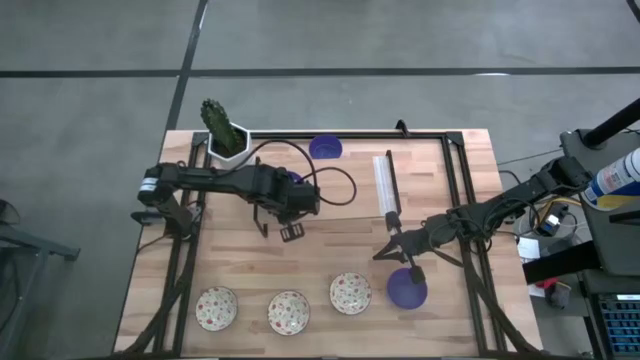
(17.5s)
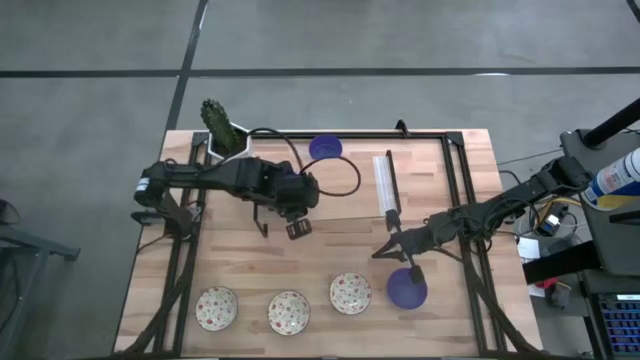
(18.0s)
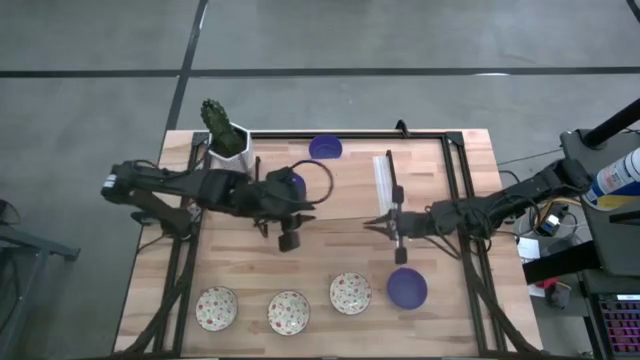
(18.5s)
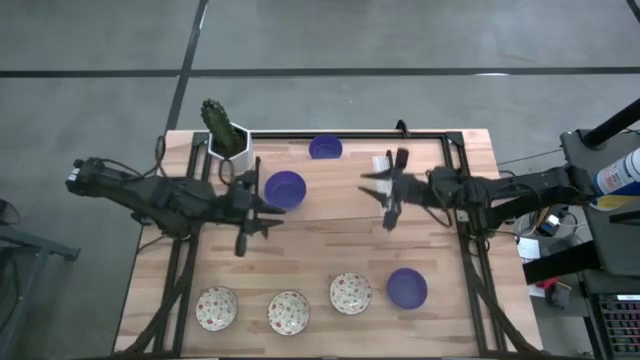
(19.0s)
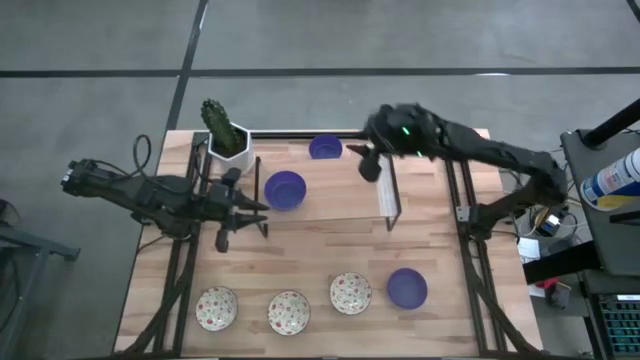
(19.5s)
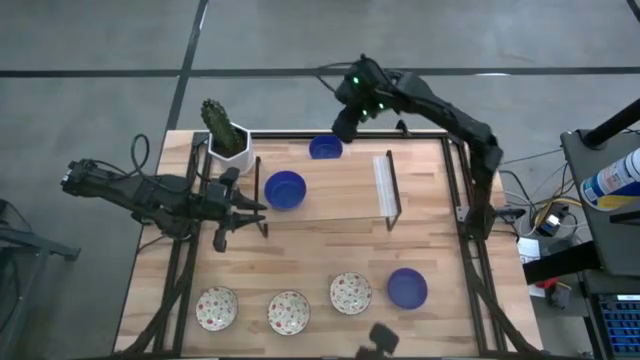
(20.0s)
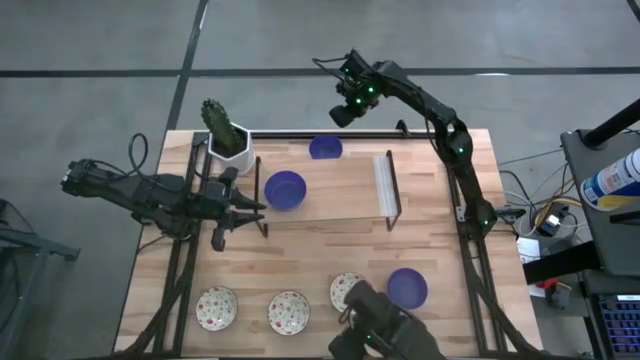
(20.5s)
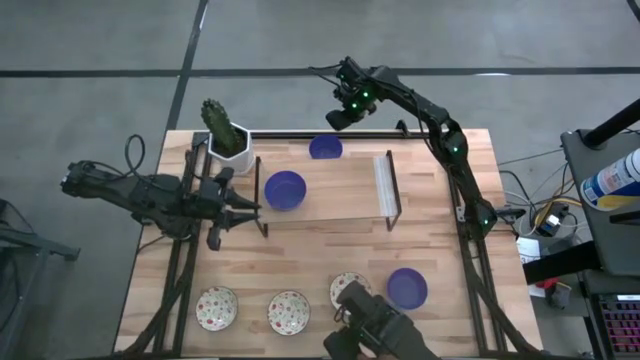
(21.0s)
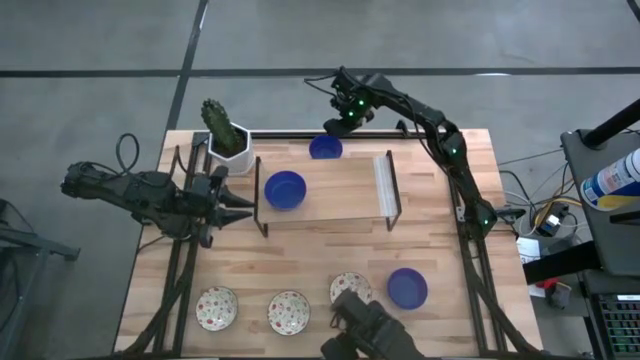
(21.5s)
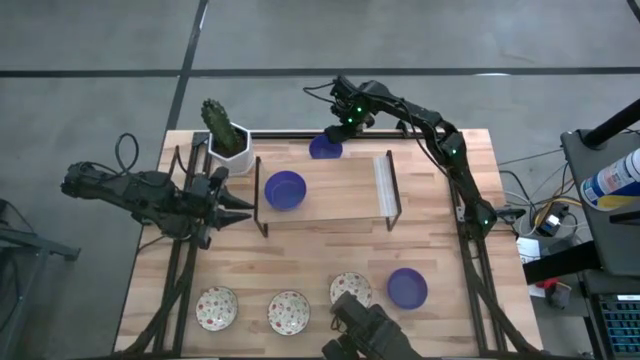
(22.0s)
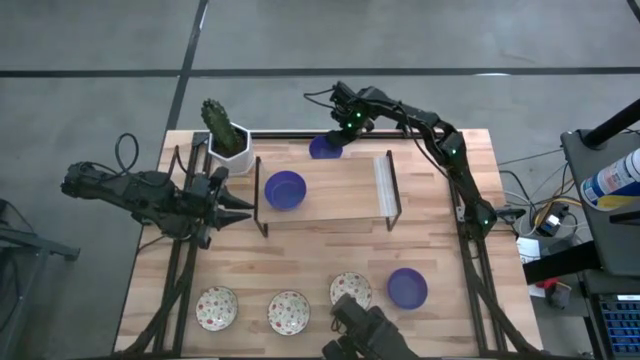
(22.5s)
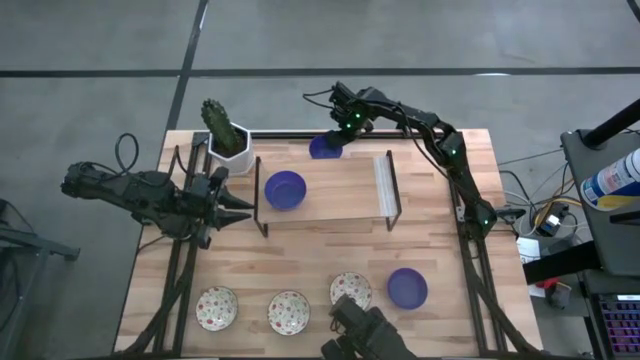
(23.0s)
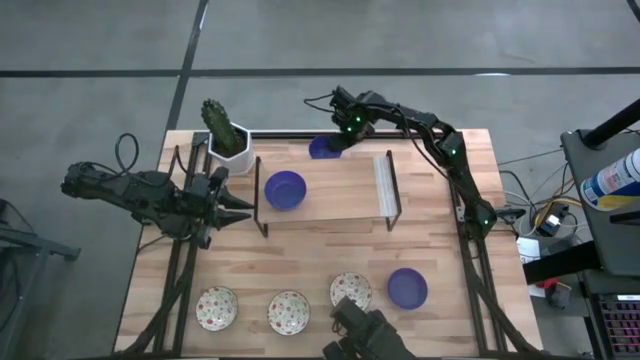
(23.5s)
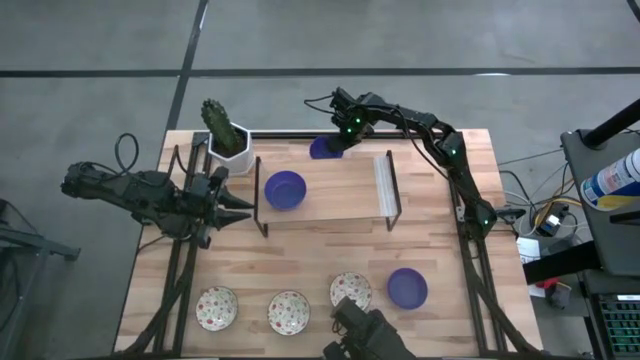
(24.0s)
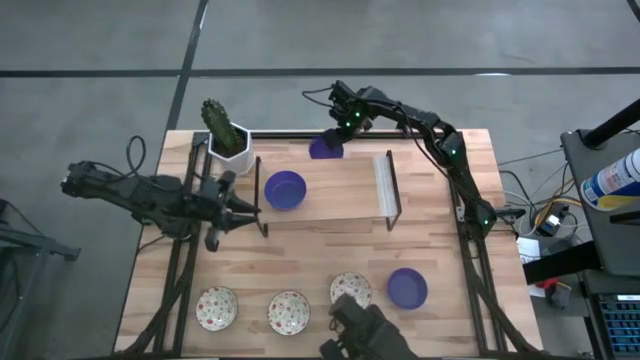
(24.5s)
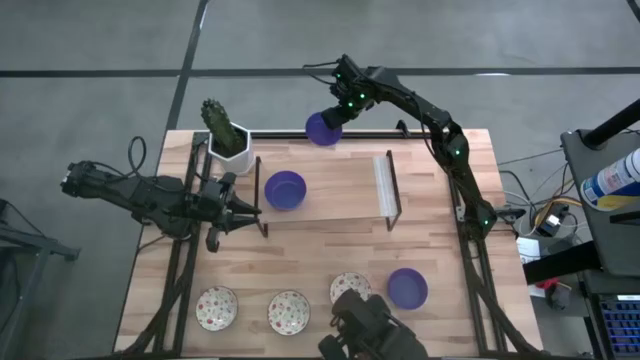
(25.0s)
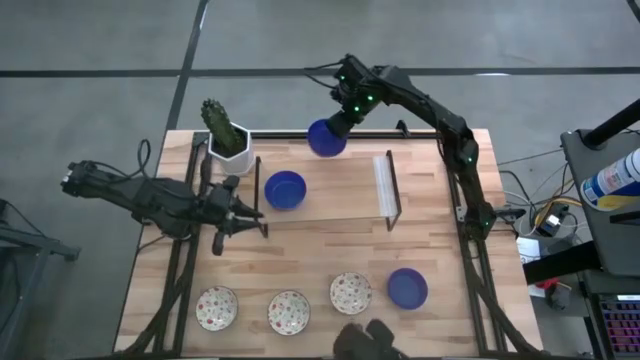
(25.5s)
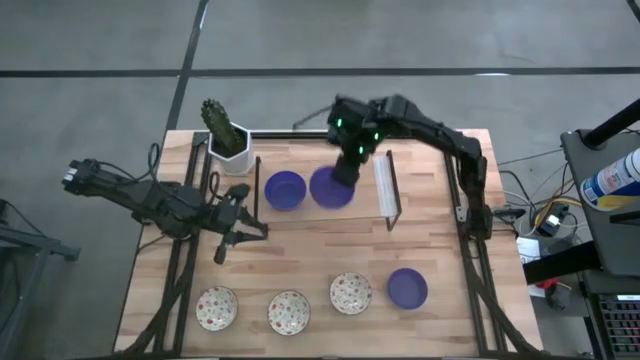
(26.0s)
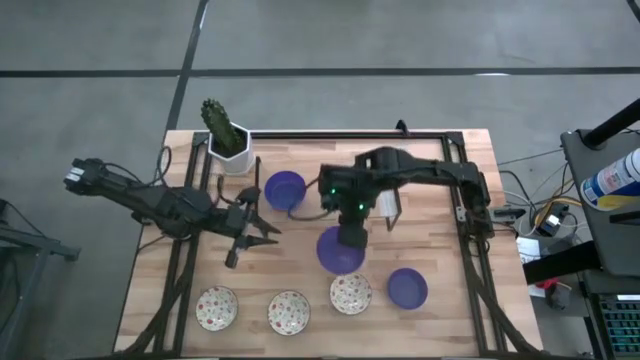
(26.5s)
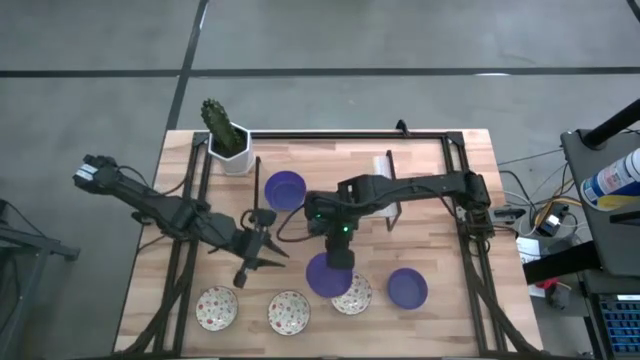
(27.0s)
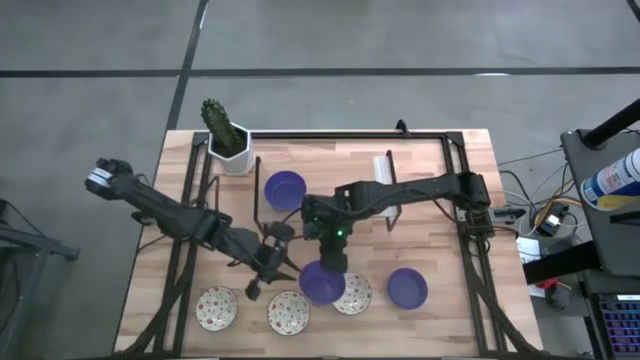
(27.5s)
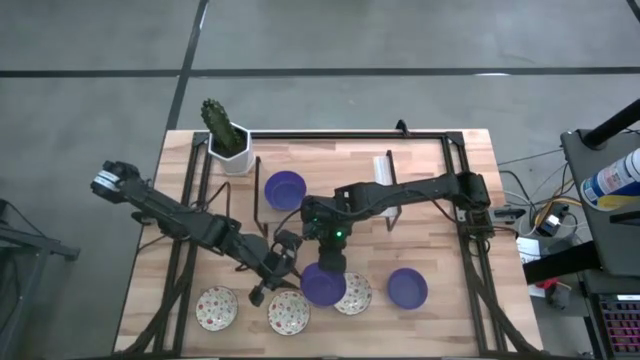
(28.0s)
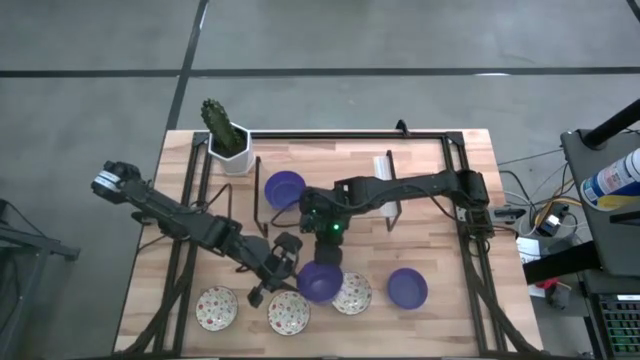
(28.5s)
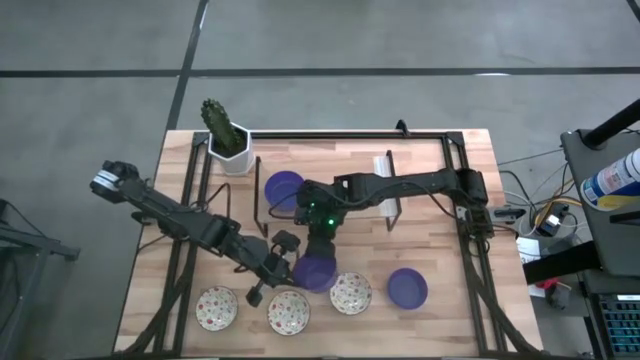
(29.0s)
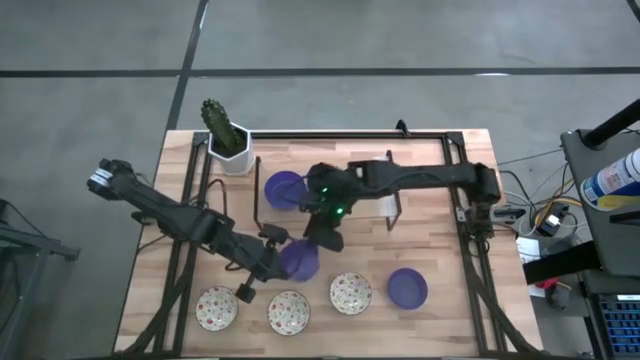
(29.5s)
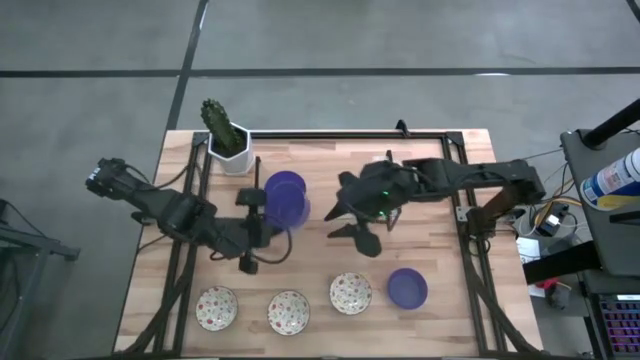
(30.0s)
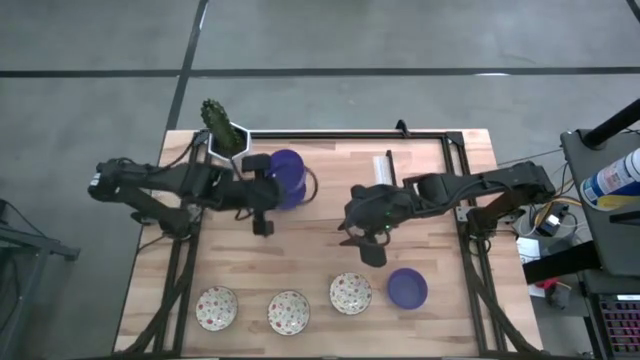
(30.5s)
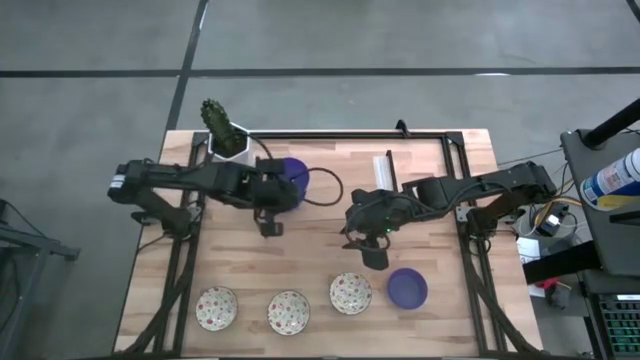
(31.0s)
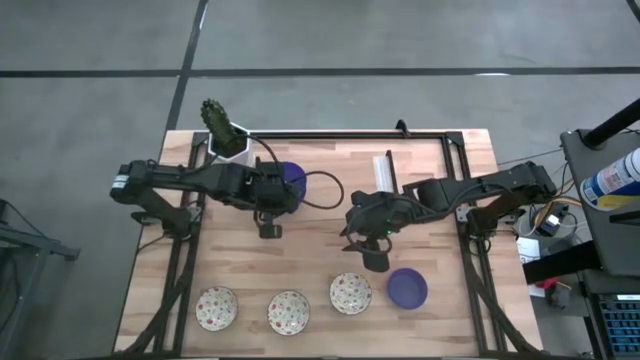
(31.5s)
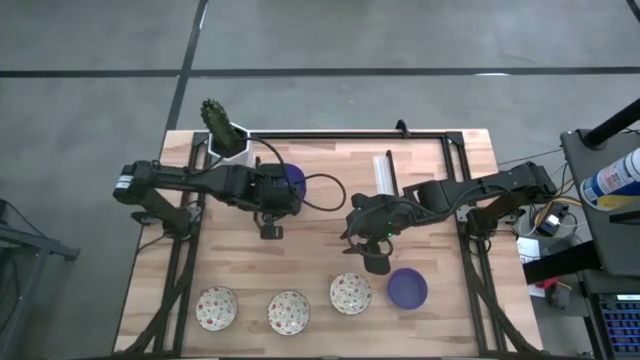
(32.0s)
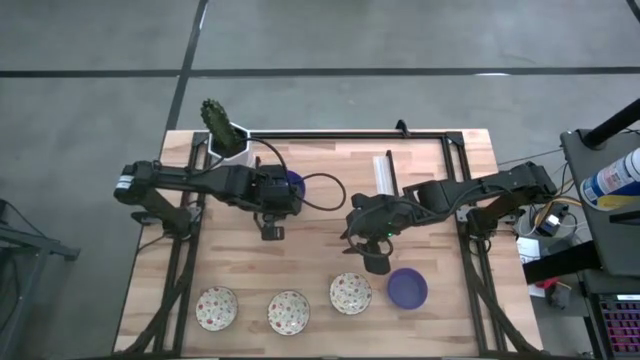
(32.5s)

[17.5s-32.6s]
Task: Pick & Place Mini bowls
Stack the top blue bowl on the blue bowl on the shelf

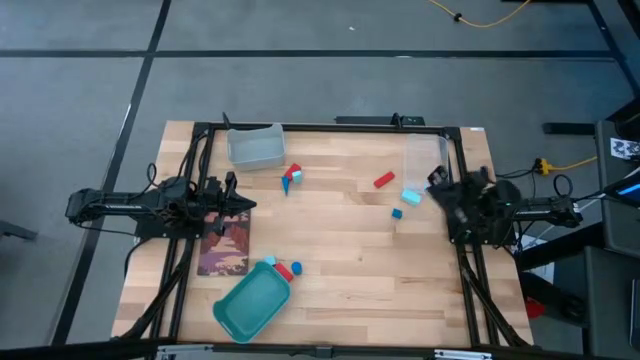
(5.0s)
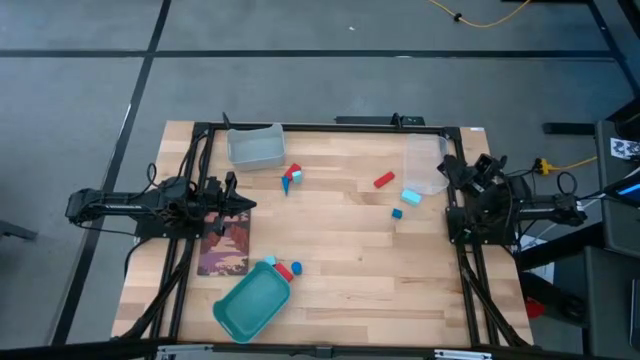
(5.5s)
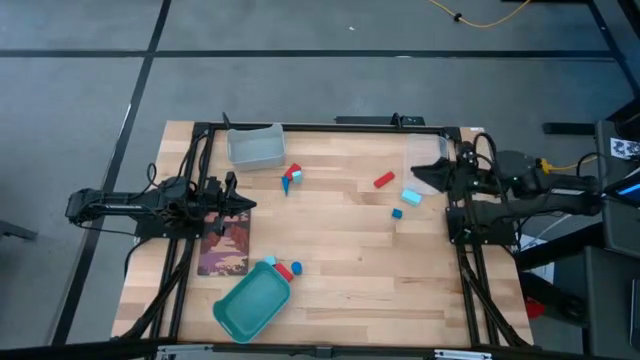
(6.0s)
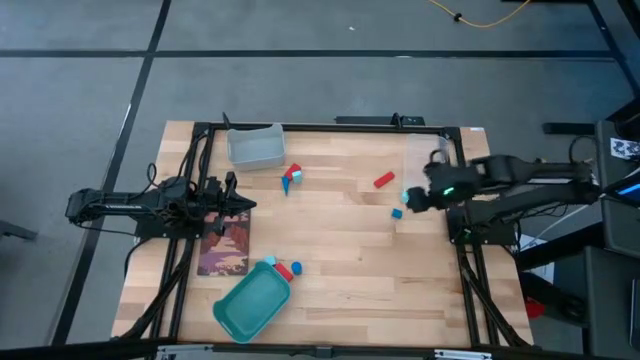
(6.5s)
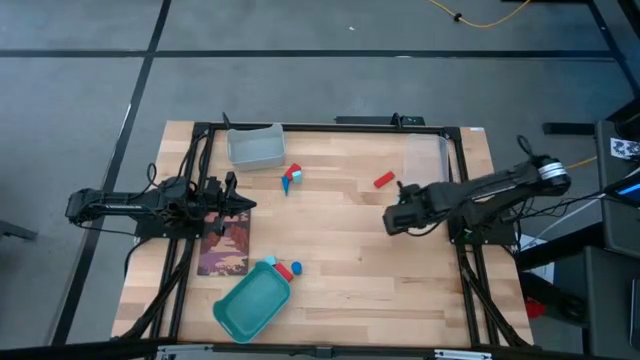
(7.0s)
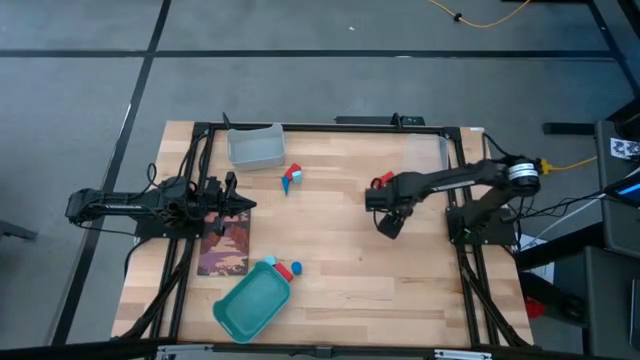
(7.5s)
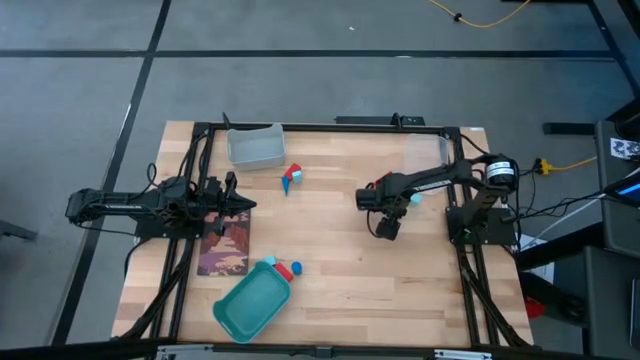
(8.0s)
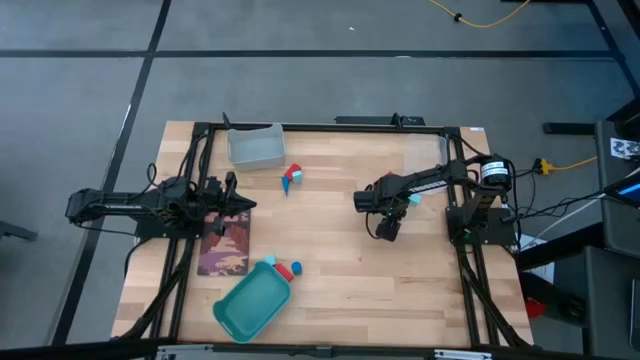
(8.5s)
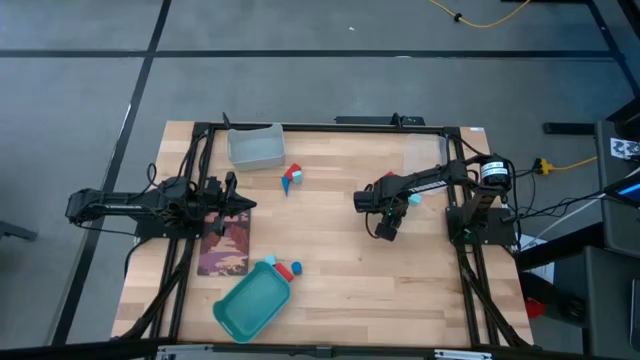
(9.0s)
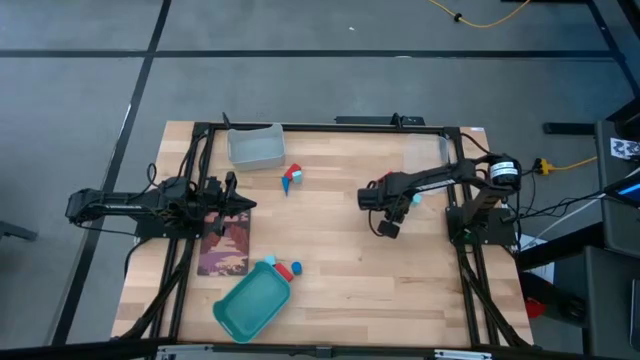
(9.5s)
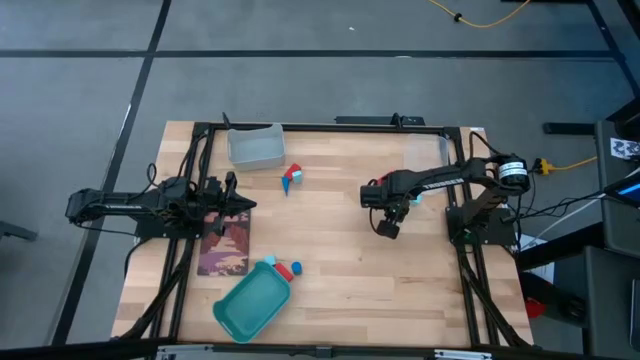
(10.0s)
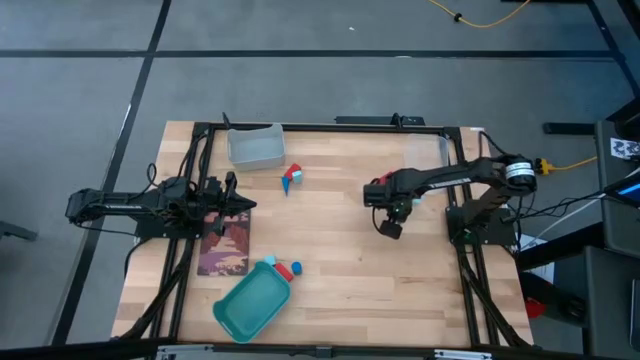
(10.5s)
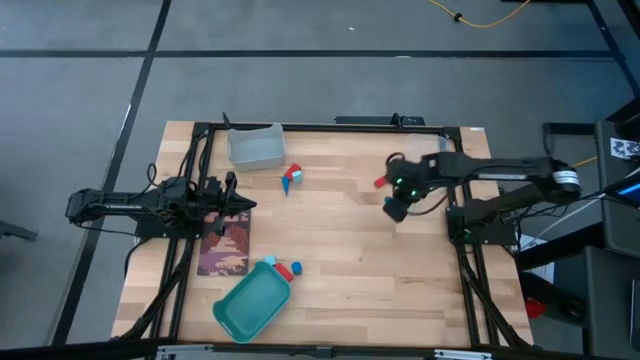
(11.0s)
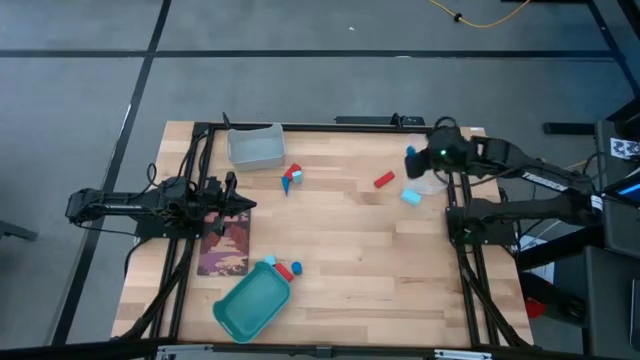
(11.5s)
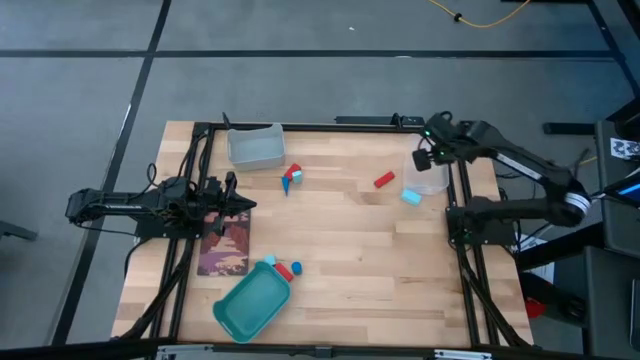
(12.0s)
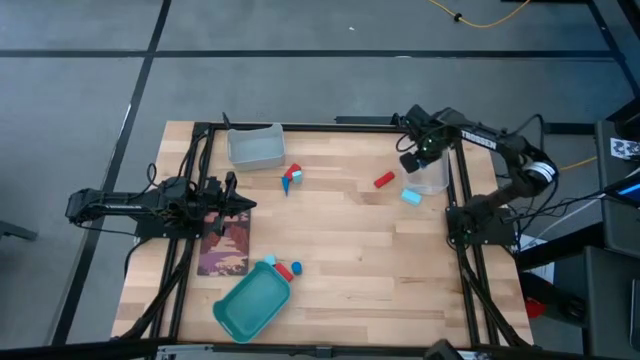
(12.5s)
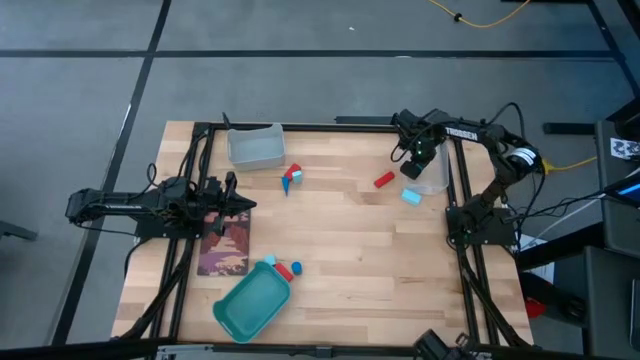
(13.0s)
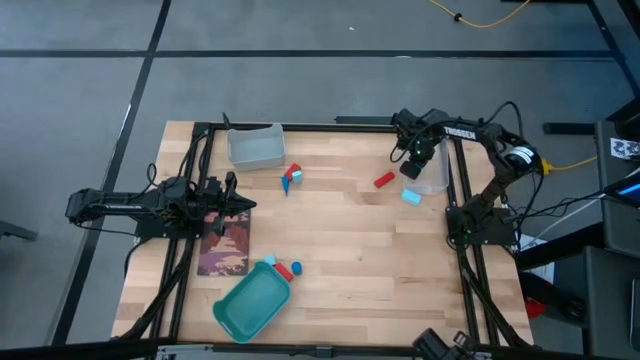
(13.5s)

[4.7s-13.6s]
Task: Sort & place blocks by color
Put the top right blue block into the transparent bin
